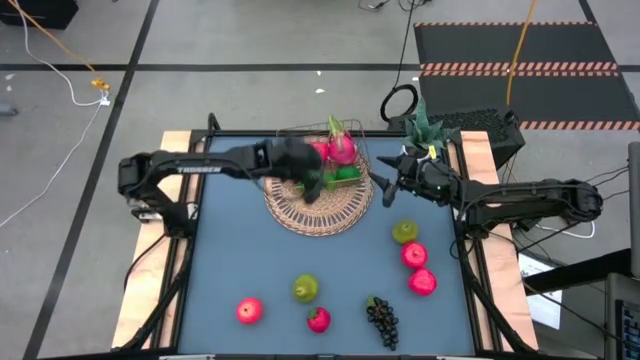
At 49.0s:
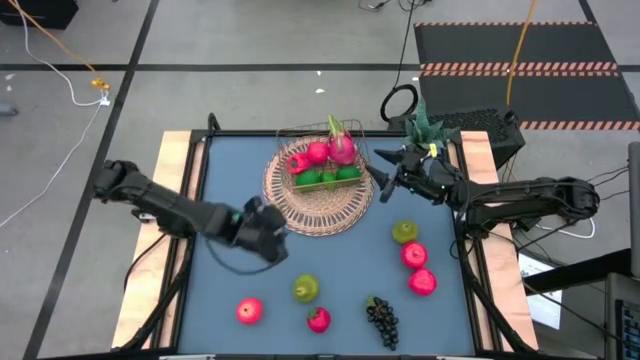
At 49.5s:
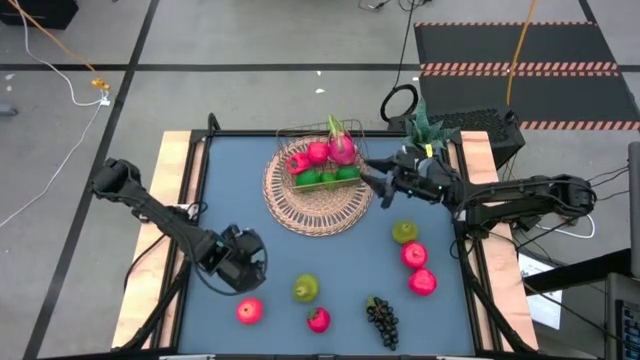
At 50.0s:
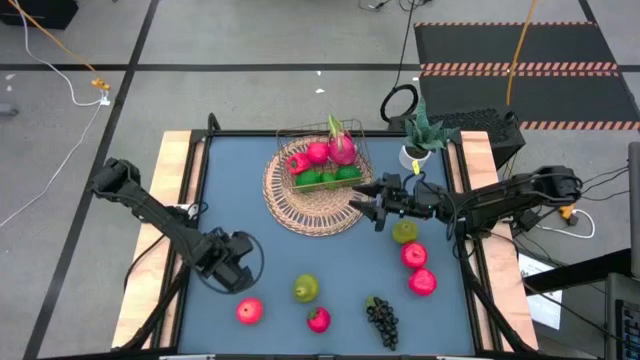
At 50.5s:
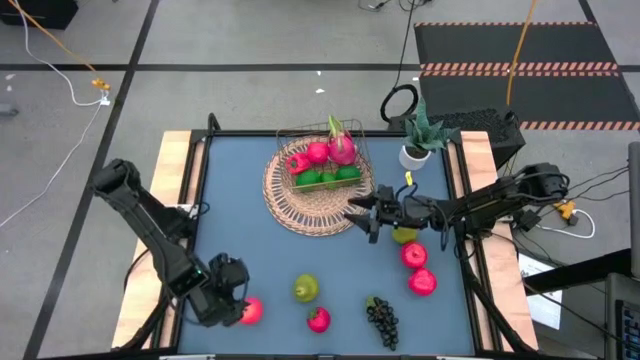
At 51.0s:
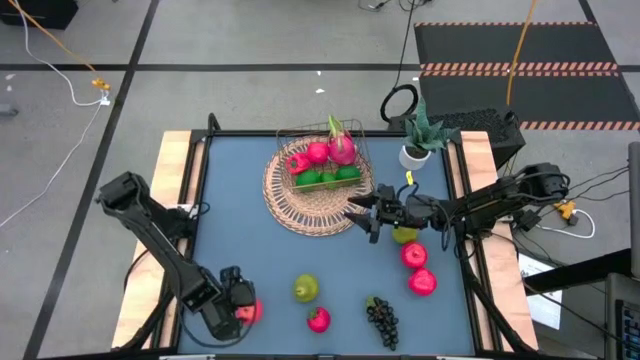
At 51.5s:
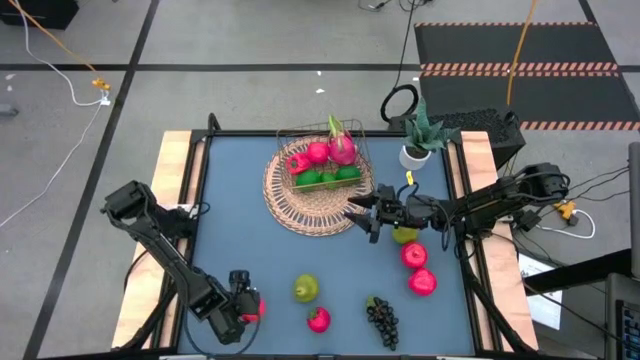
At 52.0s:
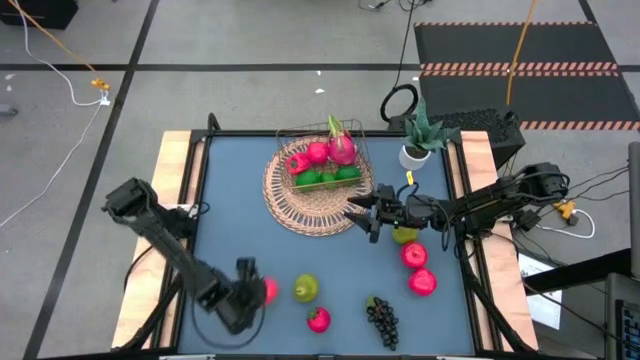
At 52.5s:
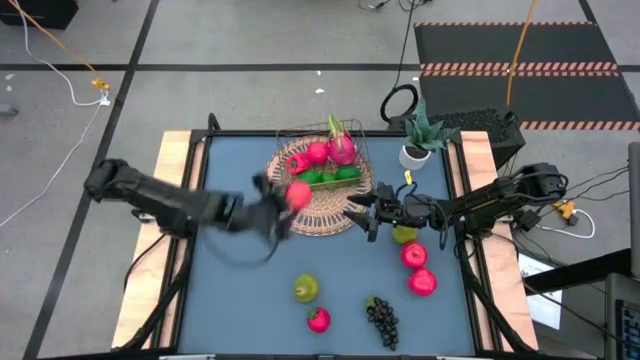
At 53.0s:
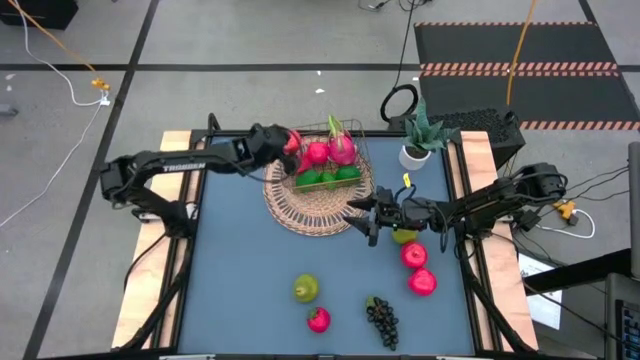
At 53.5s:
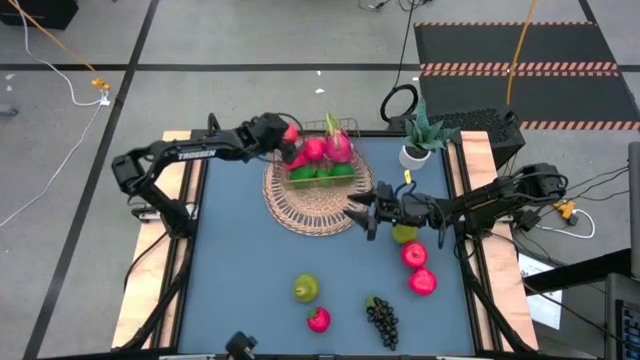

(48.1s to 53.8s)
Task: Build produce basket
Put the red apple into the gold wire basket

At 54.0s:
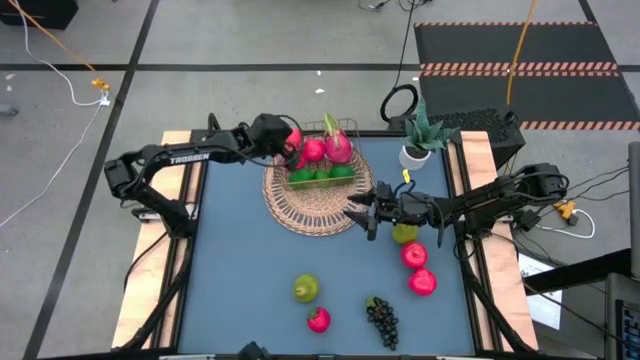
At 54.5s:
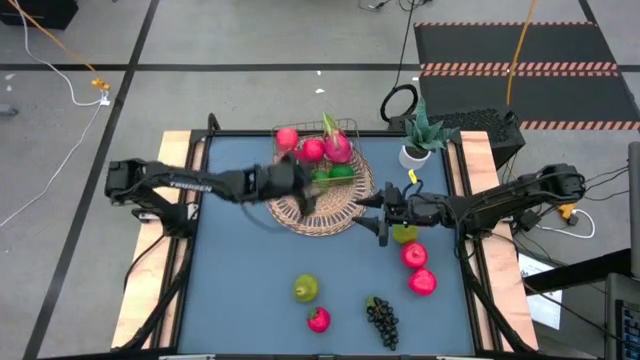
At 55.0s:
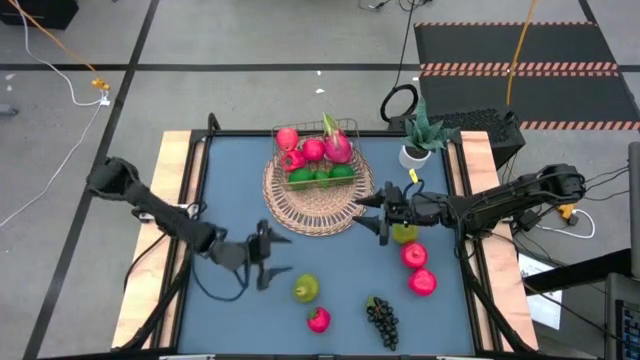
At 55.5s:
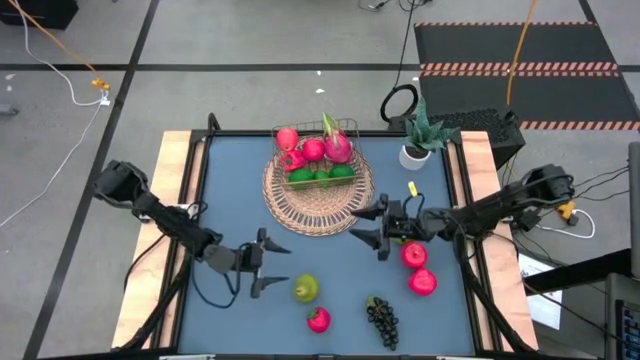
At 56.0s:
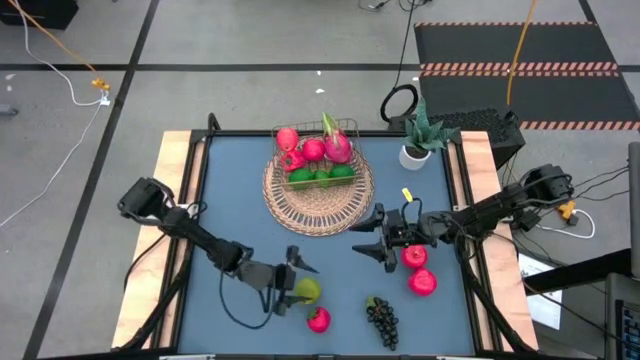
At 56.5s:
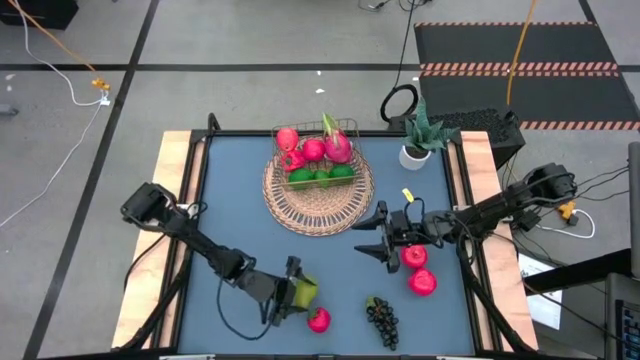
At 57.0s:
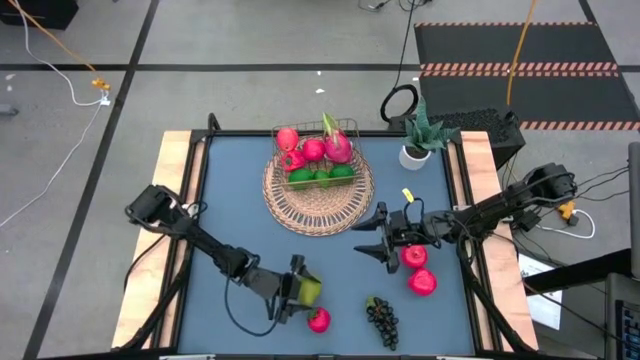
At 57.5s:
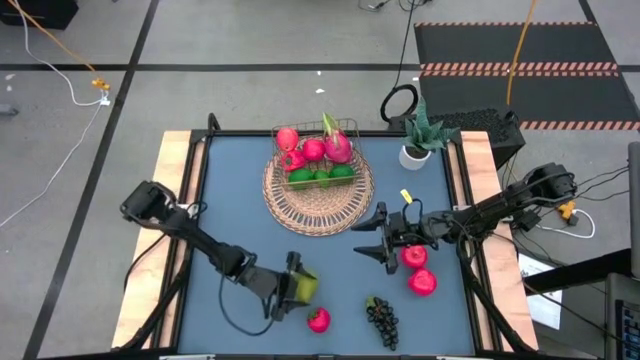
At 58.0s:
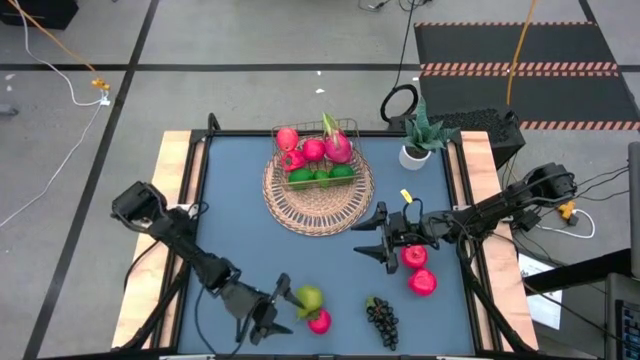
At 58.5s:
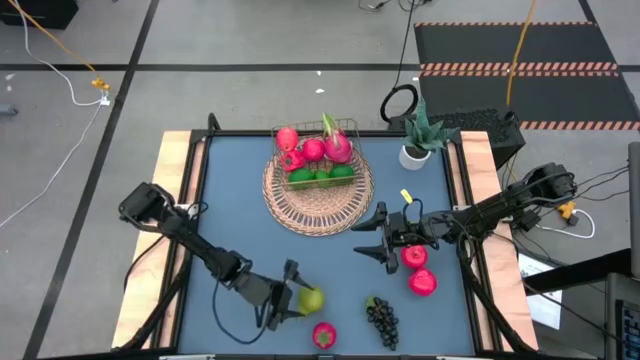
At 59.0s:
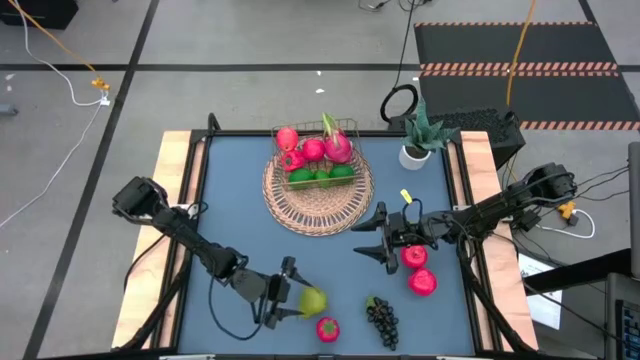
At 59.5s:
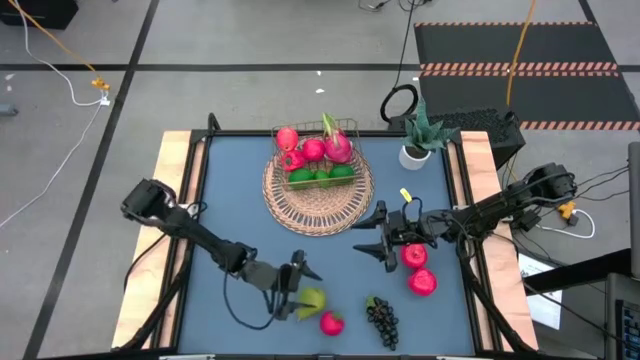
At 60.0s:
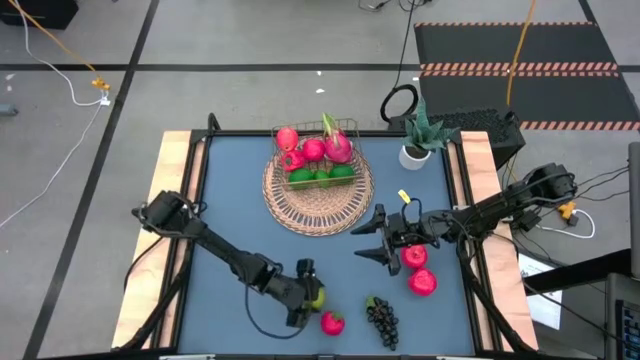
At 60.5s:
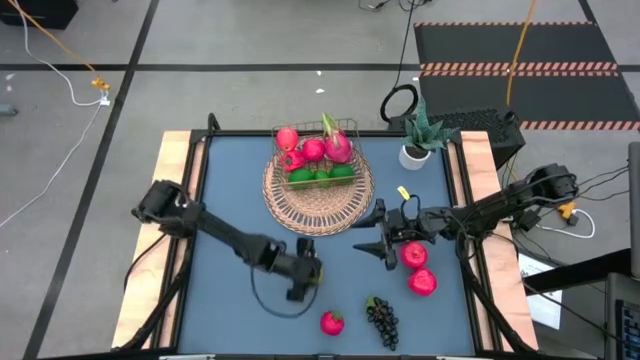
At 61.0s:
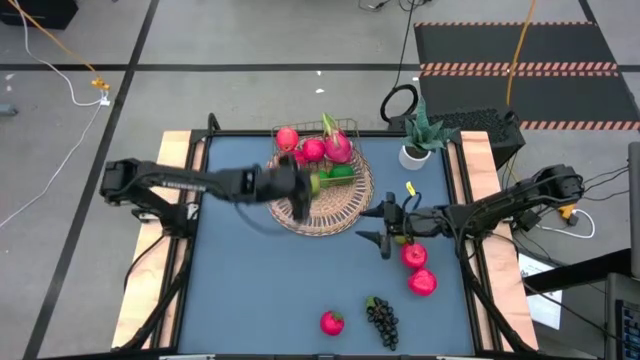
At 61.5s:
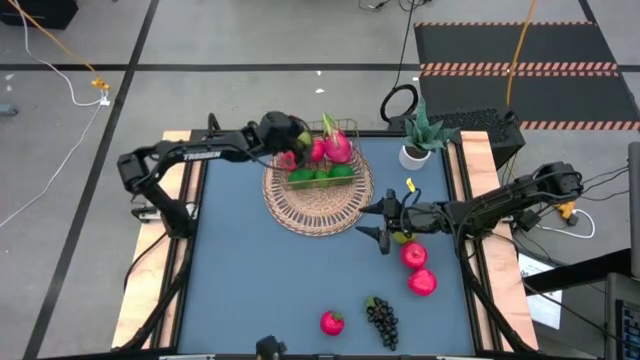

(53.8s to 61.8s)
Put the green pear into the gold wire basket

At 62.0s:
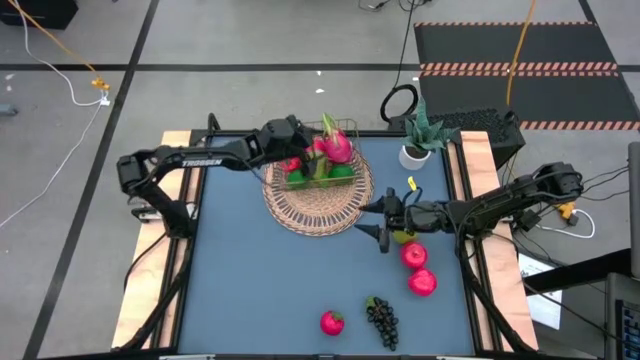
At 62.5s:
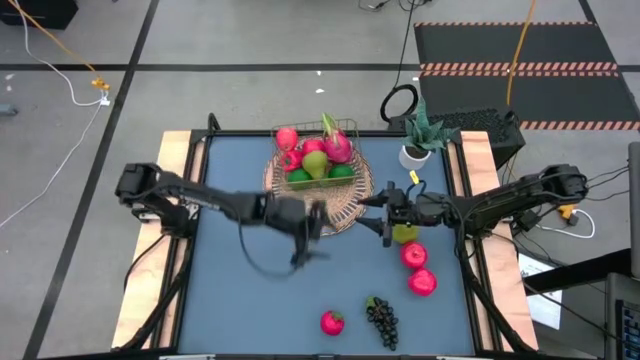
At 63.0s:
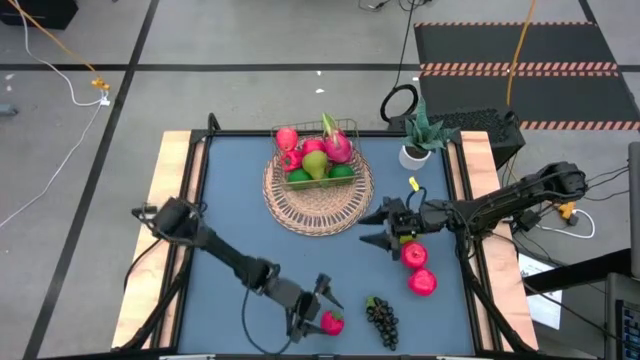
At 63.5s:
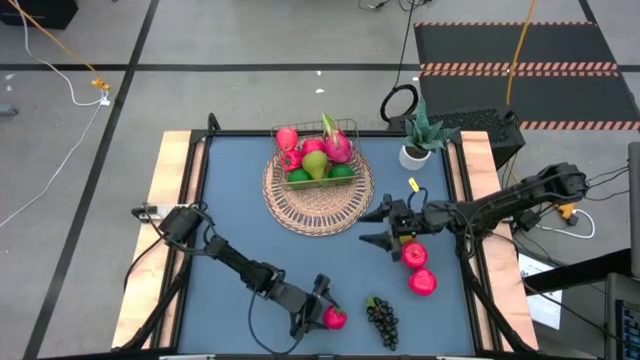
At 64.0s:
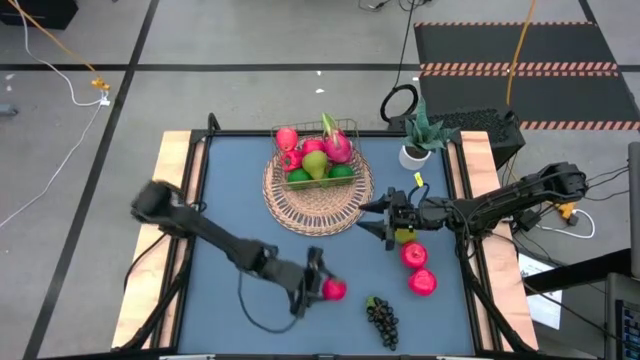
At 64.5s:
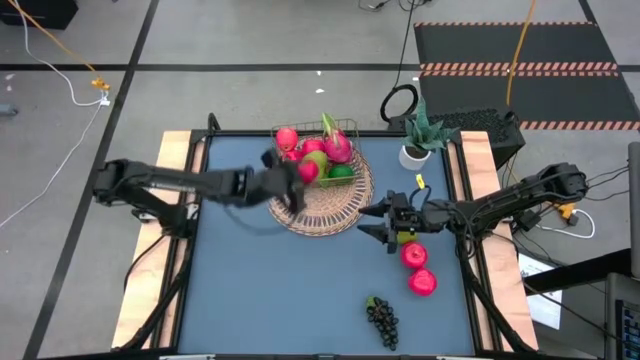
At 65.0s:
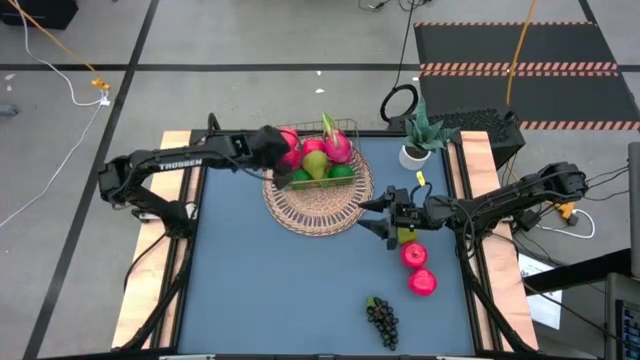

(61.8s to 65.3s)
Put the red tomato into the gold wire basket

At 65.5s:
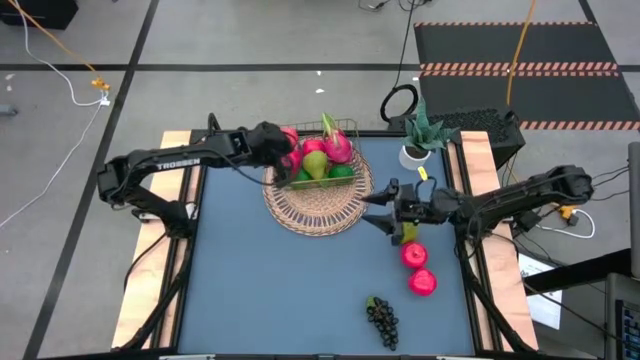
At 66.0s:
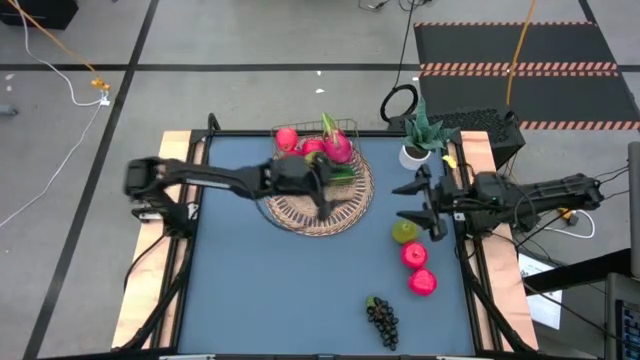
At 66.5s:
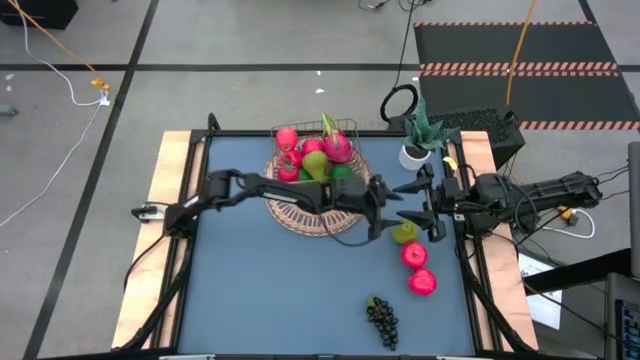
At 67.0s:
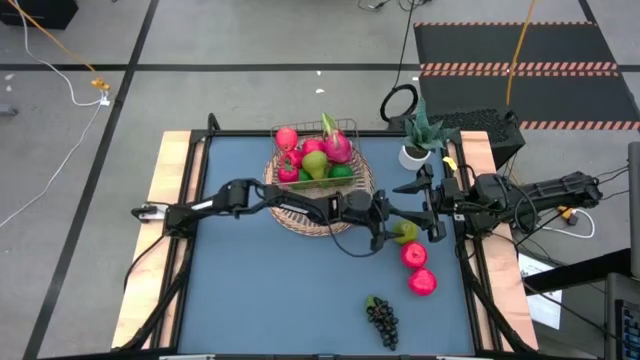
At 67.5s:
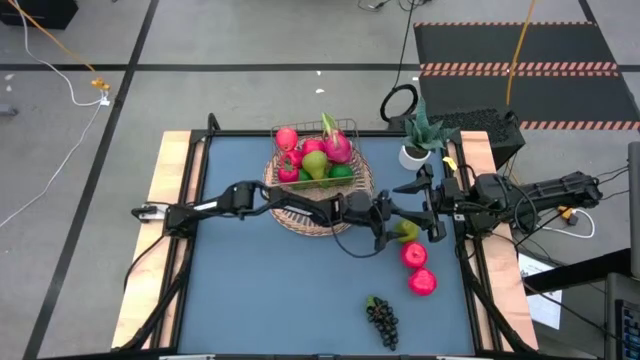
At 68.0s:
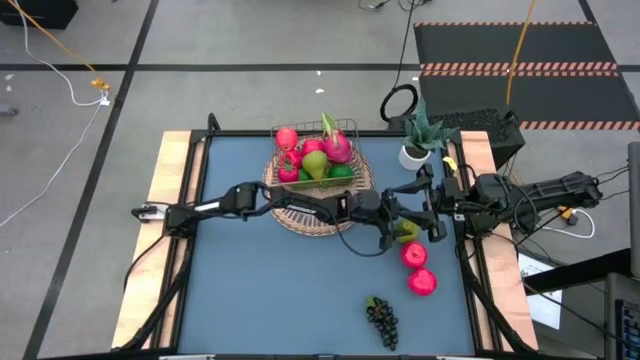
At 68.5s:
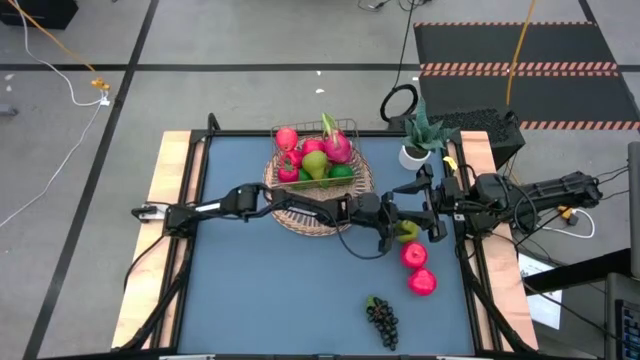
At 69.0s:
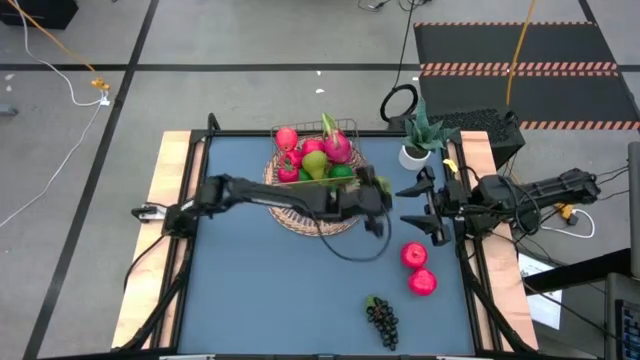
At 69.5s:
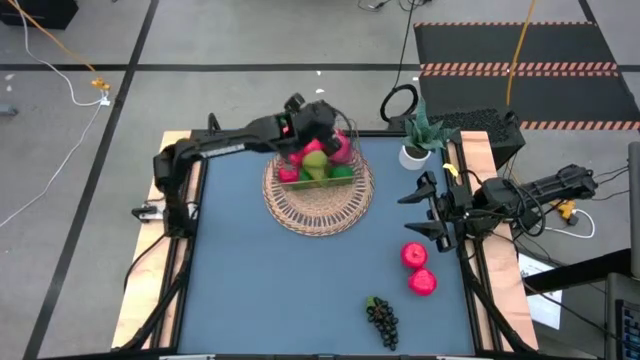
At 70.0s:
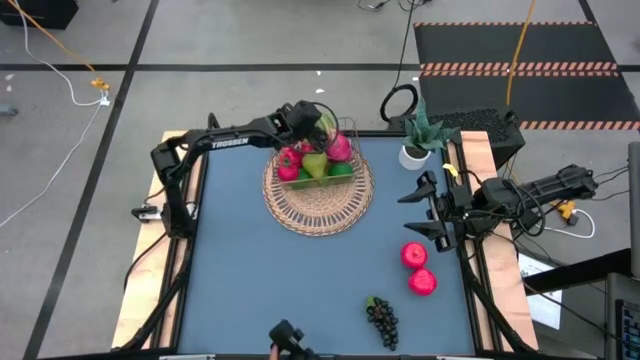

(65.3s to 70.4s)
Put the green pear into the gold wire basket
